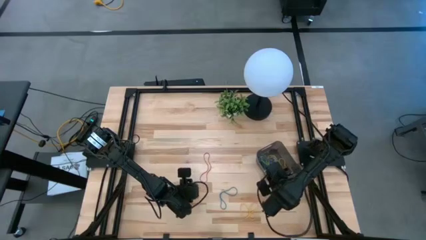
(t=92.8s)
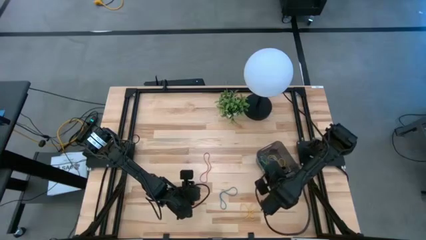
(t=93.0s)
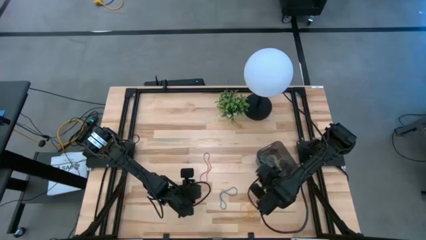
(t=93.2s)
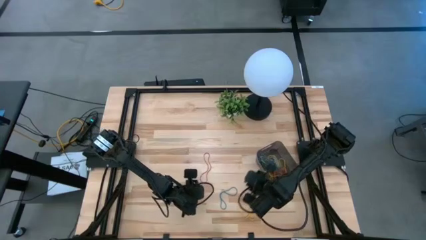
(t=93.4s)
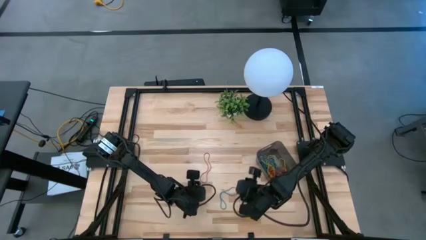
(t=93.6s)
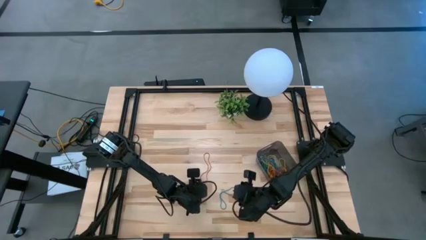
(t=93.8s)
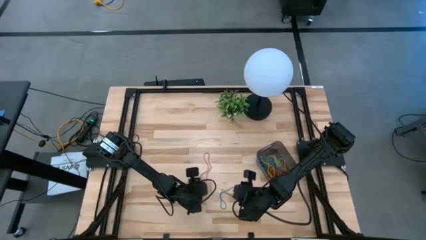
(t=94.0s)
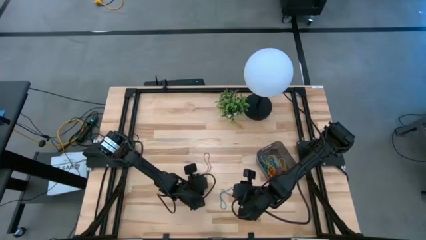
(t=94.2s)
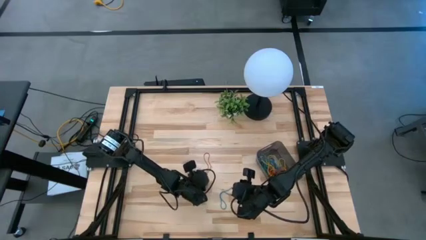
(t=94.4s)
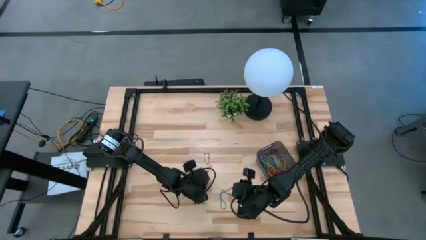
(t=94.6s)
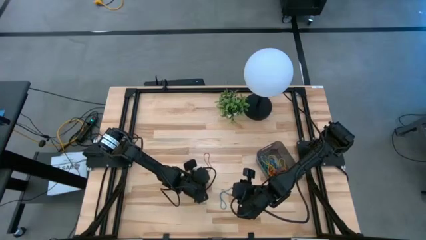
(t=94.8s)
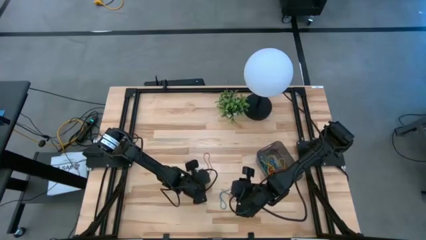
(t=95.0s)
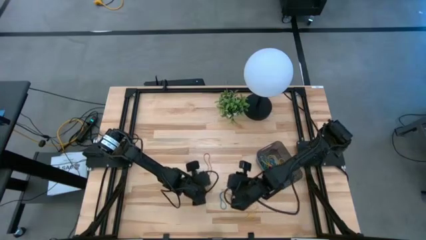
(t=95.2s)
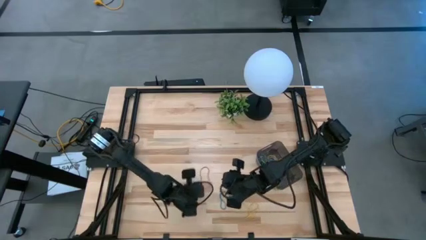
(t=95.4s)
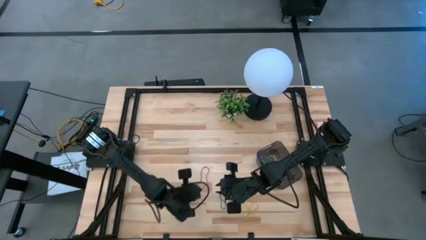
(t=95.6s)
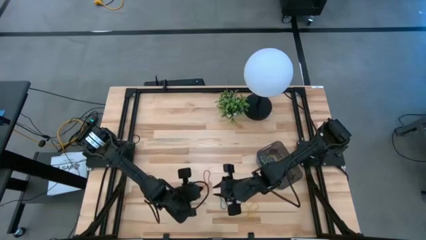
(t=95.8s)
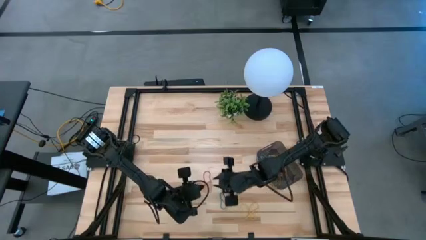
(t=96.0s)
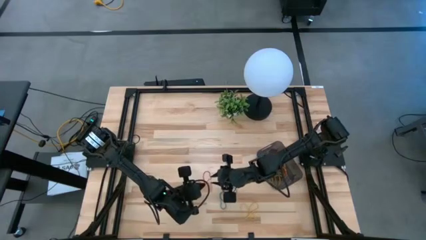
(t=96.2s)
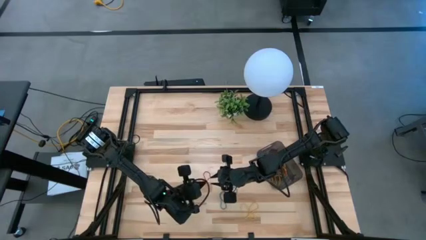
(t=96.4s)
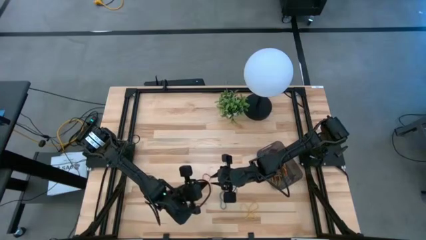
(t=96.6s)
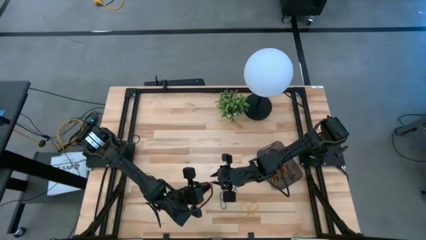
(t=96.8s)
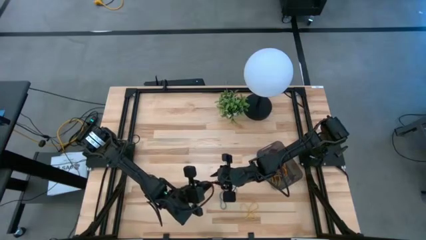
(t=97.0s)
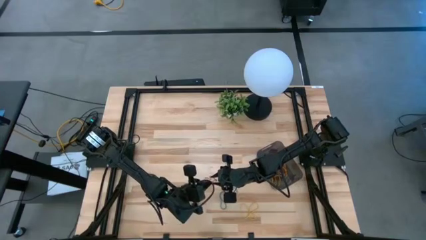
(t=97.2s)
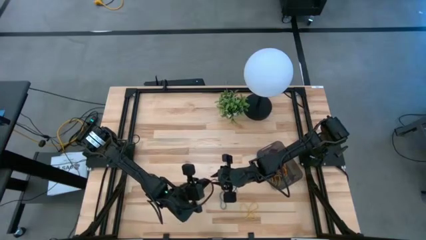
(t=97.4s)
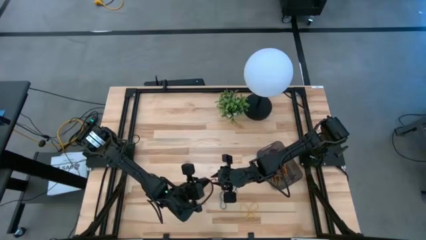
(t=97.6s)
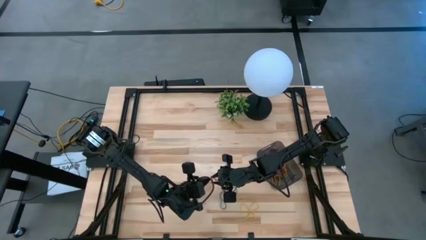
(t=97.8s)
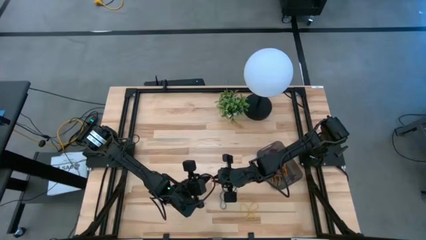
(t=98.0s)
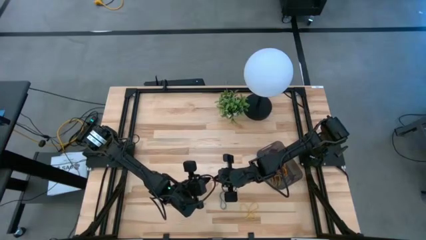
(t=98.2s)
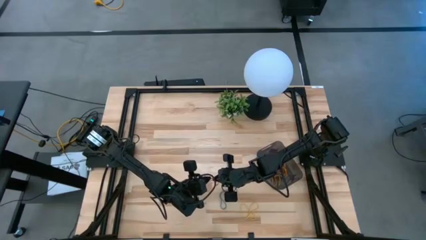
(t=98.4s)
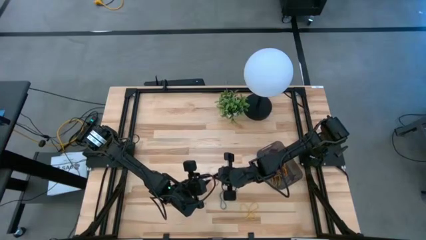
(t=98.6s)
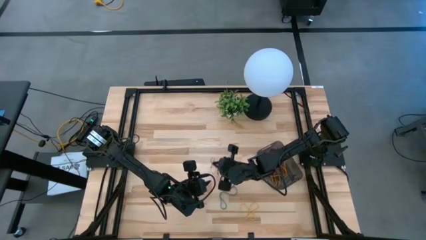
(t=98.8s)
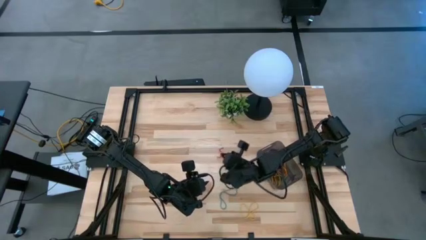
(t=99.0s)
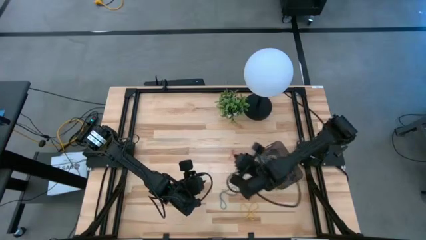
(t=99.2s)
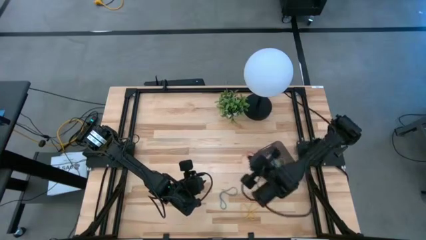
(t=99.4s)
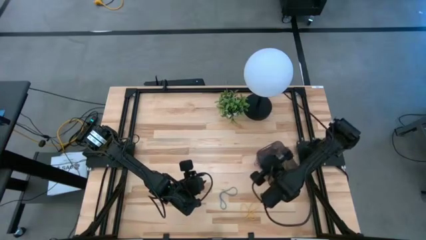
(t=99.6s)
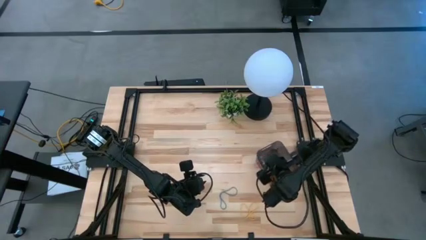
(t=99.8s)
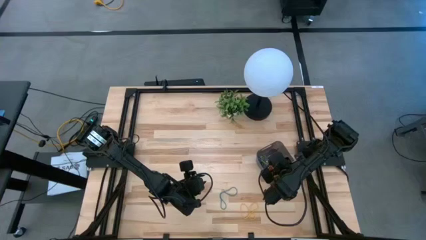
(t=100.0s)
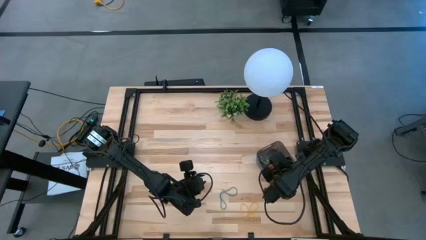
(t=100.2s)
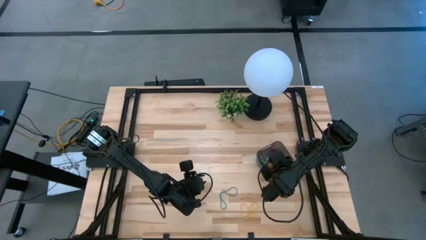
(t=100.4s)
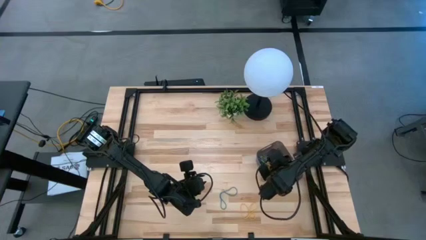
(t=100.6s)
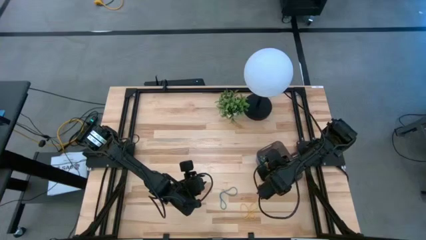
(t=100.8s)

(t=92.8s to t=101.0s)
Task: Pick and place items into bin
Put the red rubber band into the black transparent bin

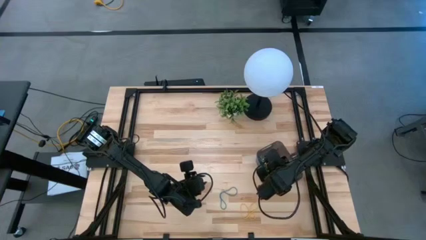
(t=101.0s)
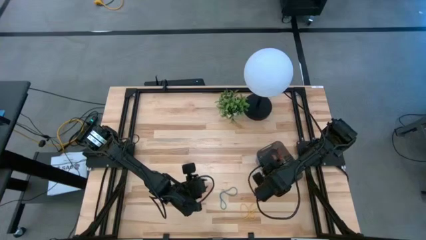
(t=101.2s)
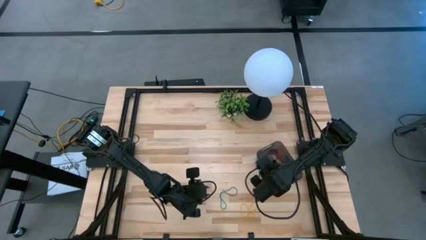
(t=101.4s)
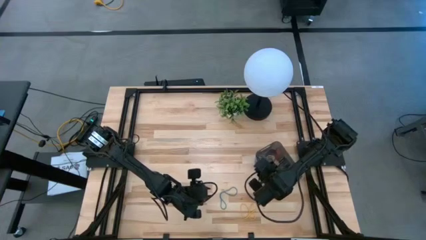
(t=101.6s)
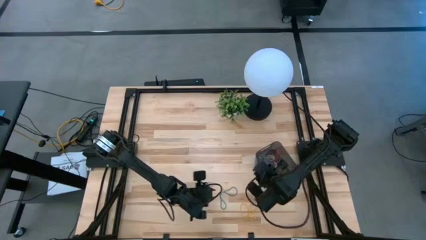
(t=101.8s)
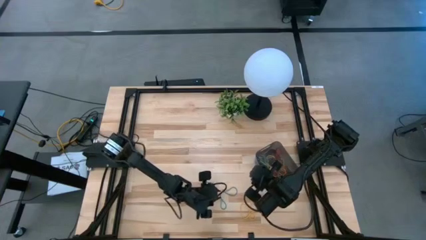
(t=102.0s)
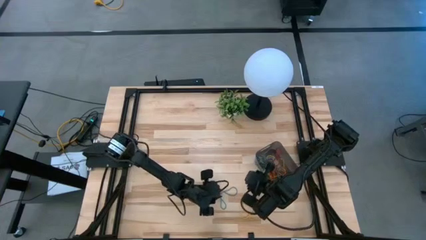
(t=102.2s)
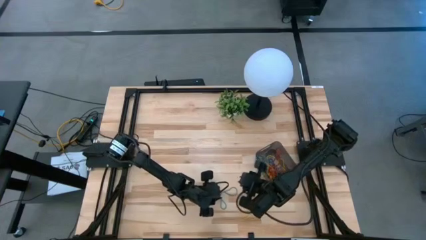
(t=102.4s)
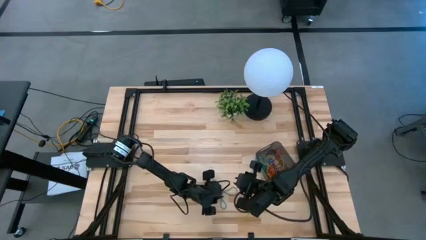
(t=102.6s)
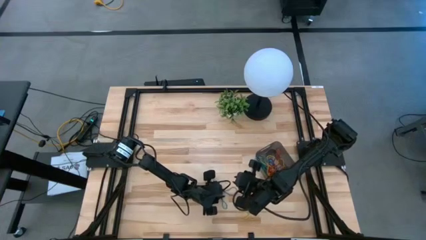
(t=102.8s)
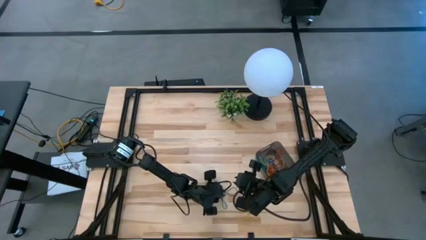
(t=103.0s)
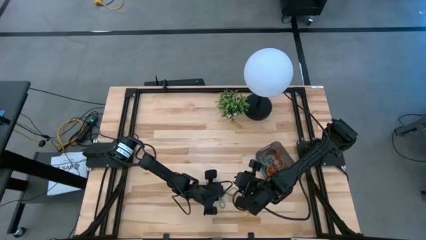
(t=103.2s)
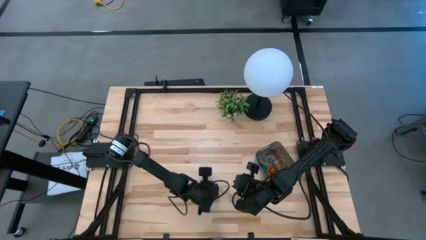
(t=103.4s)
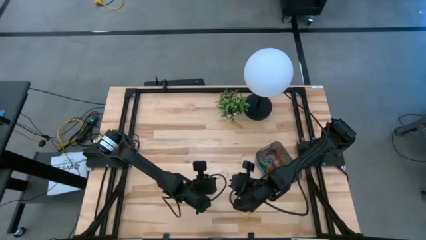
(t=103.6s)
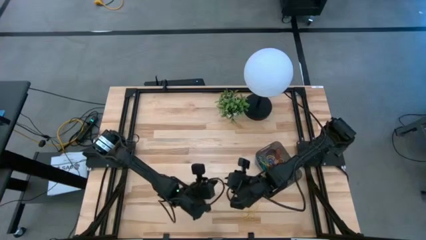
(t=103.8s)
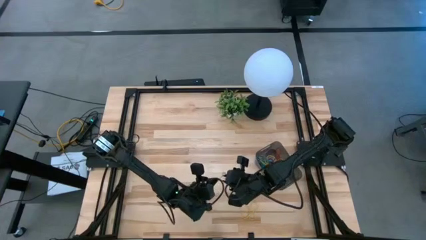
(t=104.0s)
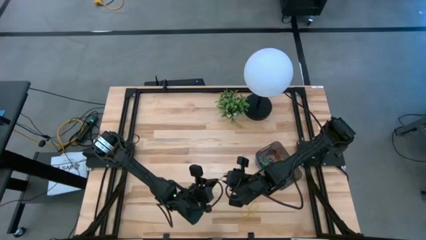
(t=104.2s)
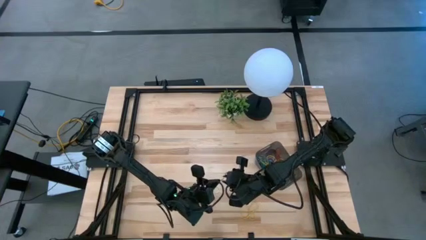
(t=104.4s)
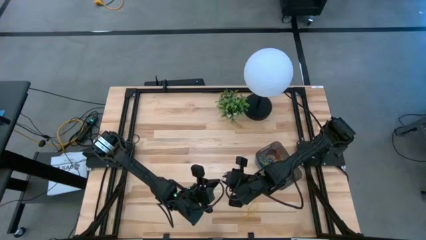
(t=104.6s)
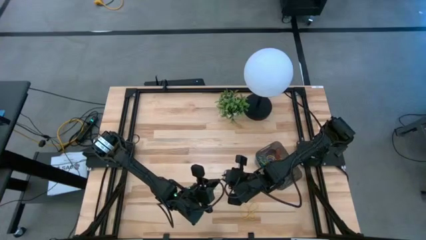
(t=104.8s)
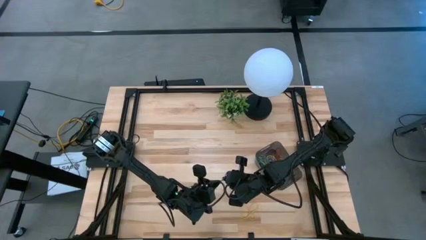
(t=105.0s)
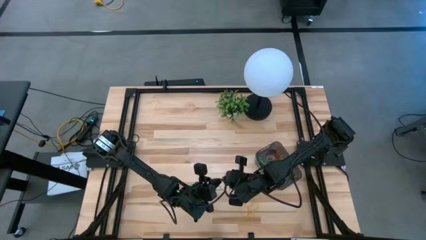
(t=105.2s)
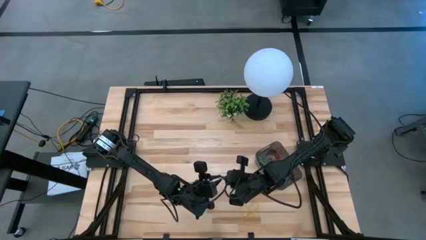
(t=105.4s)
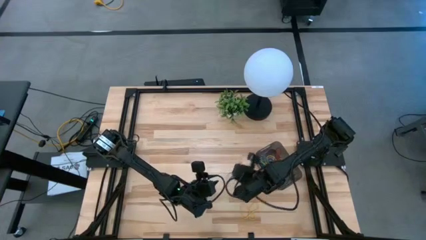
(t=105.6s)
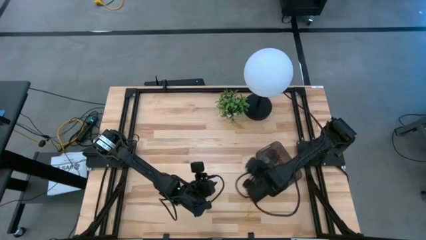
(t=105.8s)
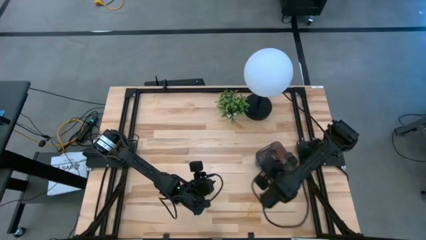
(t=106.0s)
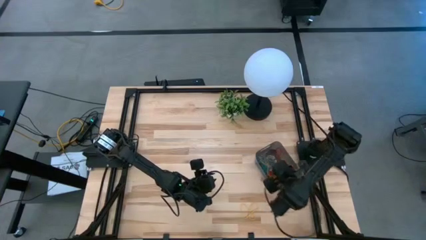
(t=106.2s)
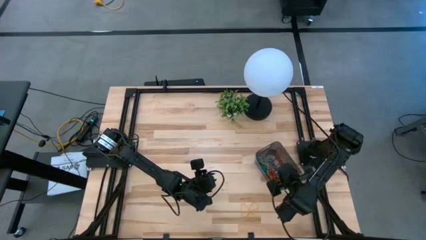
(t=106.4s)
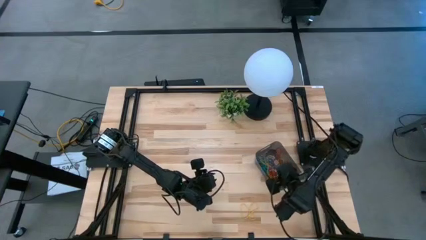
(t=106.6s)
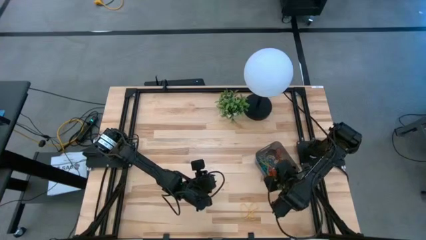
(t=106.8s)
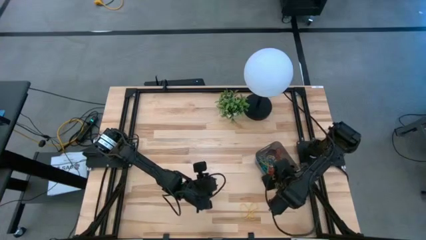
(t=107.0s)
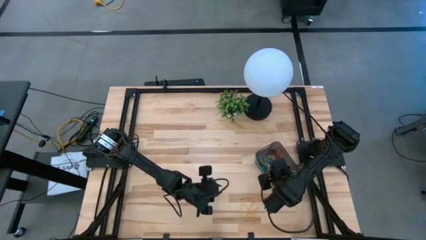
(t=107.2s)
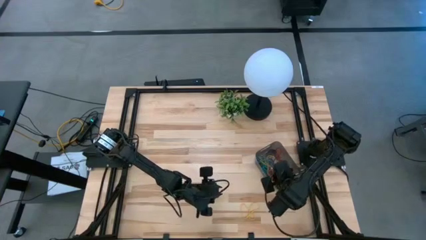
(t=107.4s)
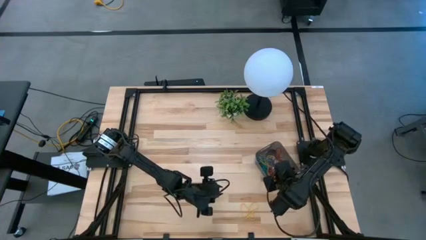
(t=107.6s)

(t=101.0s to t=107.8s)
Put the blue rubber band into the black transparent bin
